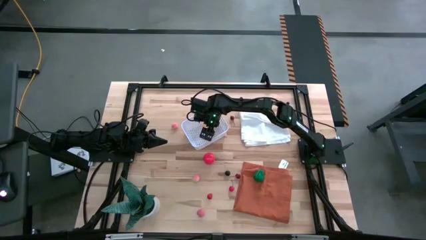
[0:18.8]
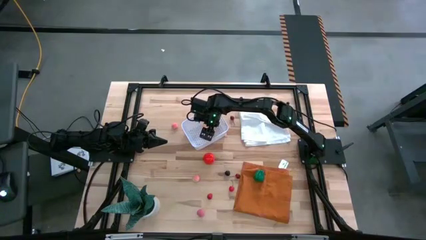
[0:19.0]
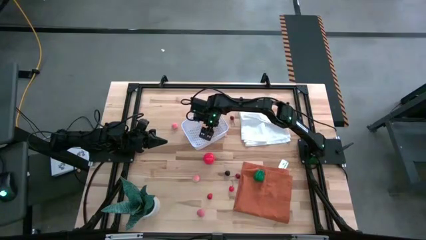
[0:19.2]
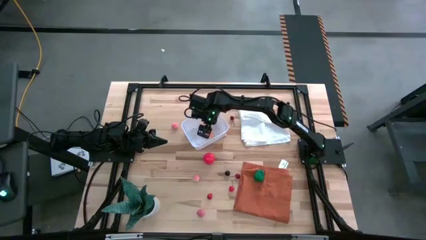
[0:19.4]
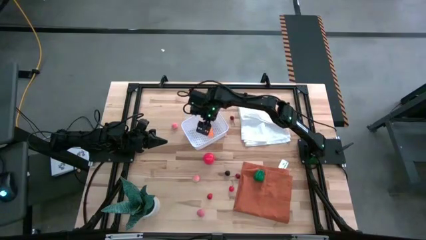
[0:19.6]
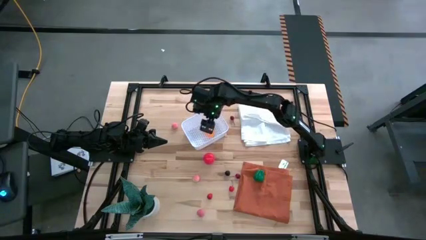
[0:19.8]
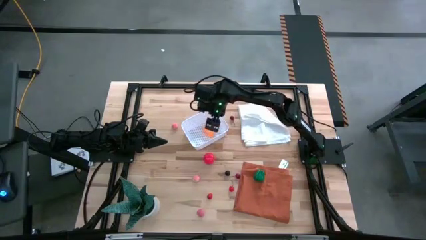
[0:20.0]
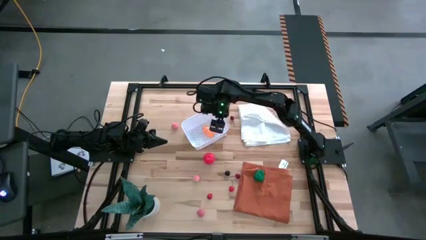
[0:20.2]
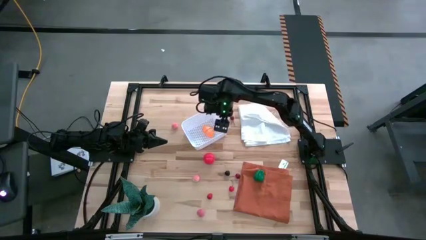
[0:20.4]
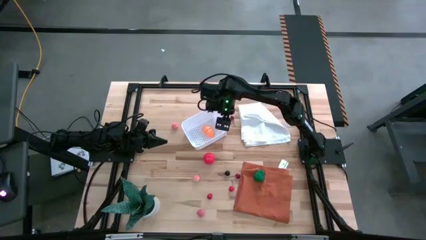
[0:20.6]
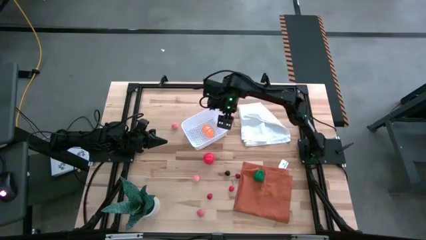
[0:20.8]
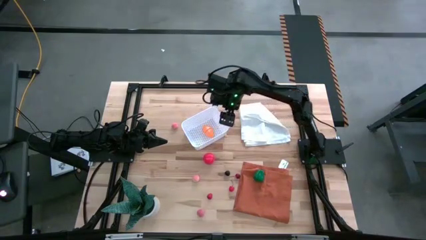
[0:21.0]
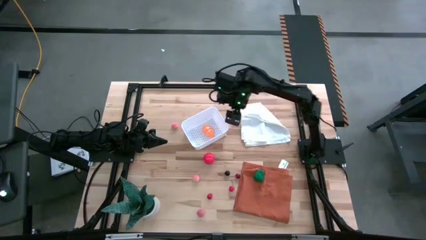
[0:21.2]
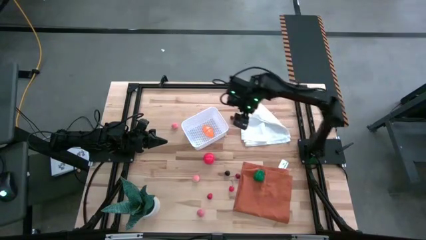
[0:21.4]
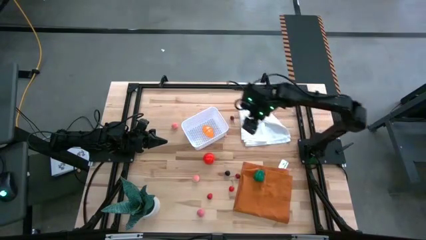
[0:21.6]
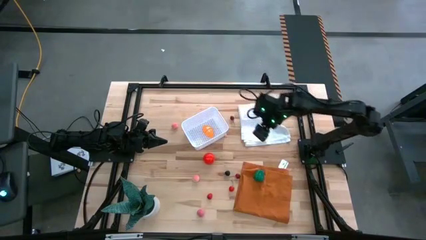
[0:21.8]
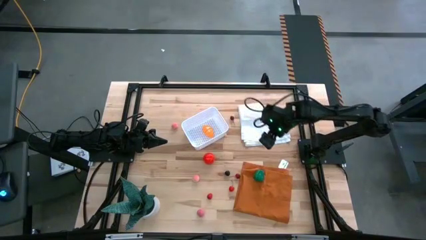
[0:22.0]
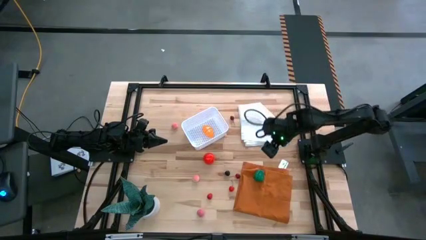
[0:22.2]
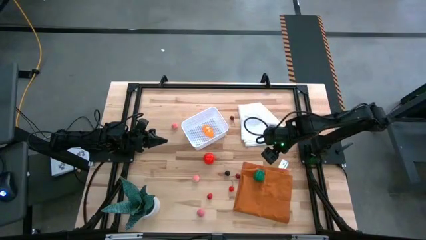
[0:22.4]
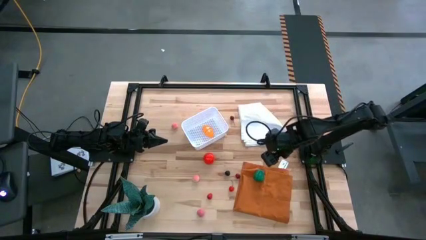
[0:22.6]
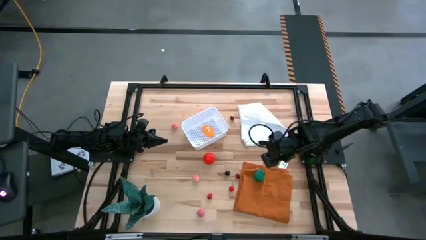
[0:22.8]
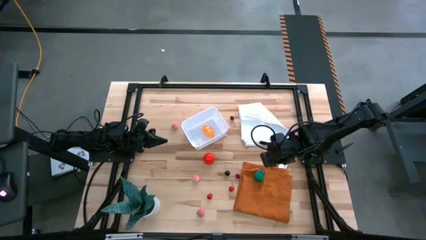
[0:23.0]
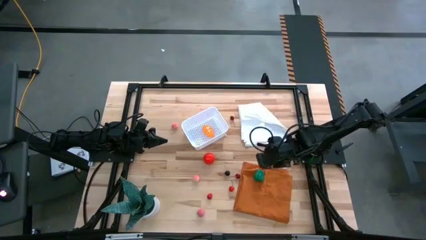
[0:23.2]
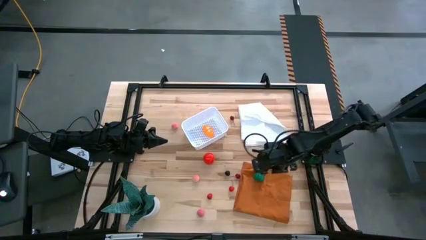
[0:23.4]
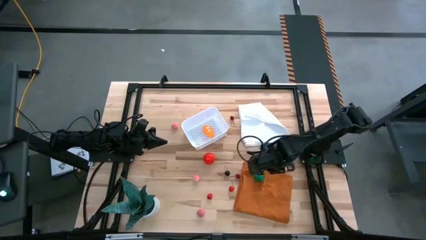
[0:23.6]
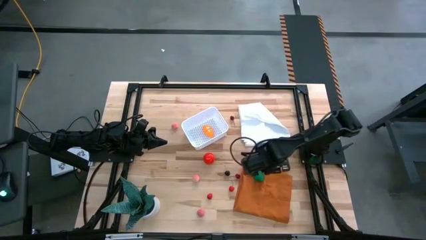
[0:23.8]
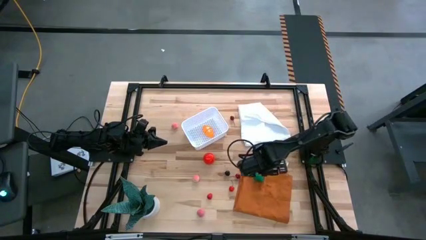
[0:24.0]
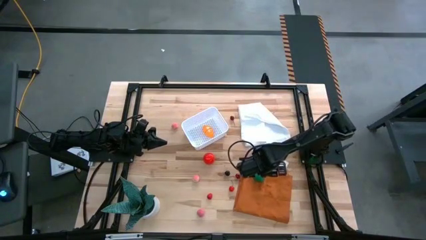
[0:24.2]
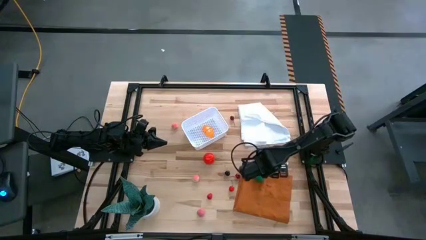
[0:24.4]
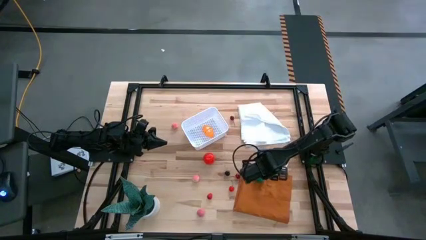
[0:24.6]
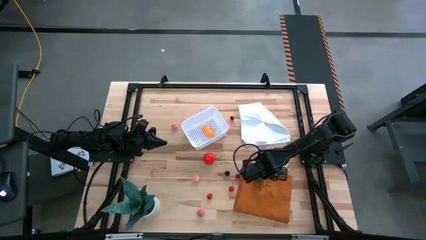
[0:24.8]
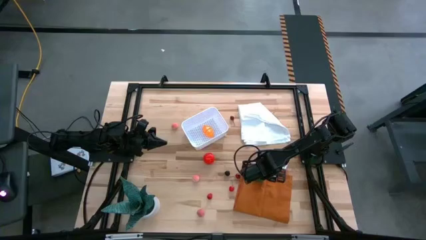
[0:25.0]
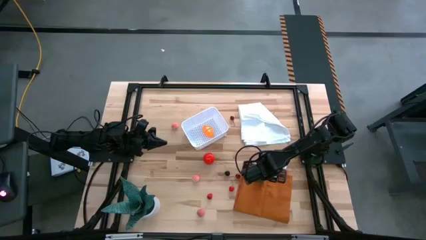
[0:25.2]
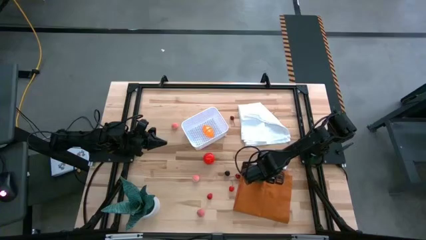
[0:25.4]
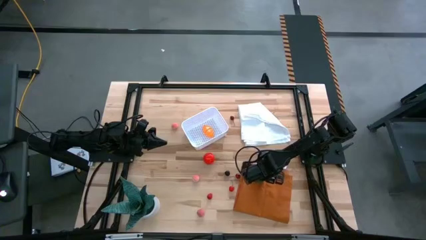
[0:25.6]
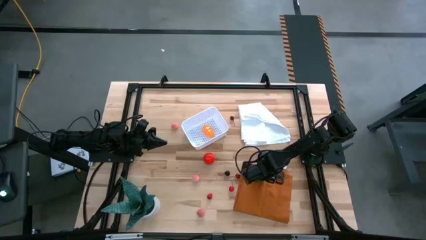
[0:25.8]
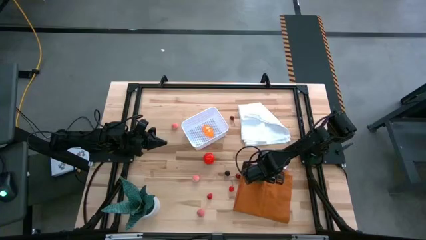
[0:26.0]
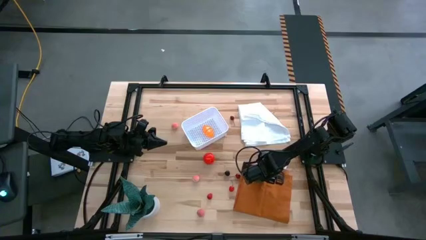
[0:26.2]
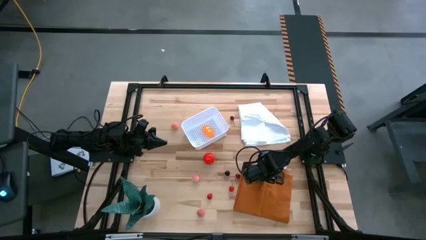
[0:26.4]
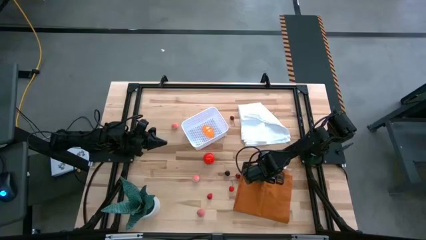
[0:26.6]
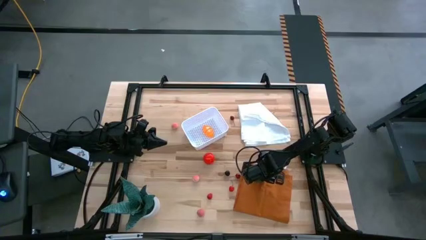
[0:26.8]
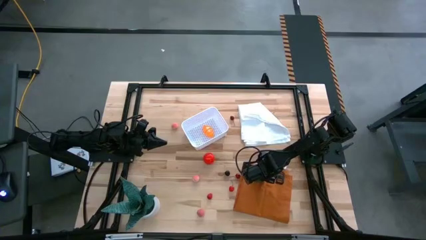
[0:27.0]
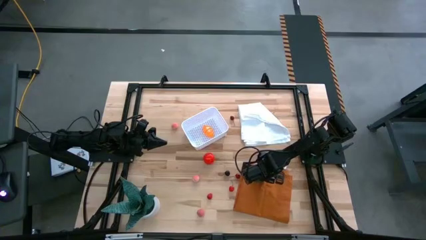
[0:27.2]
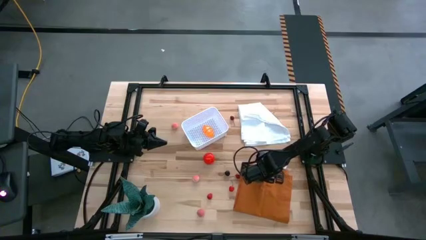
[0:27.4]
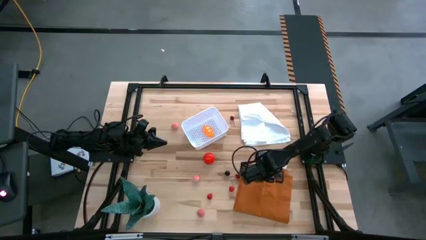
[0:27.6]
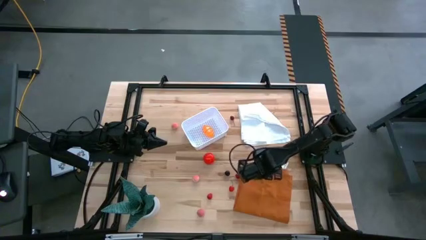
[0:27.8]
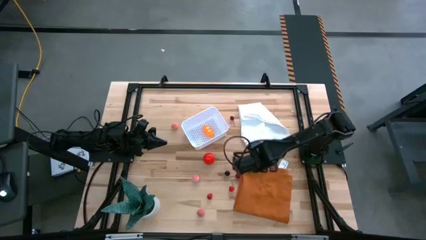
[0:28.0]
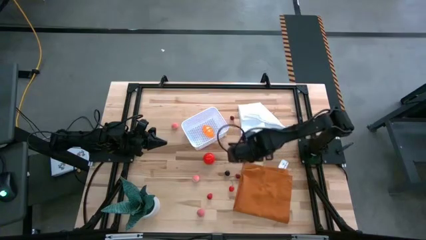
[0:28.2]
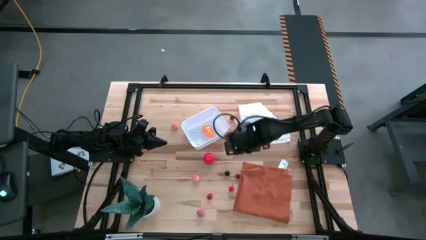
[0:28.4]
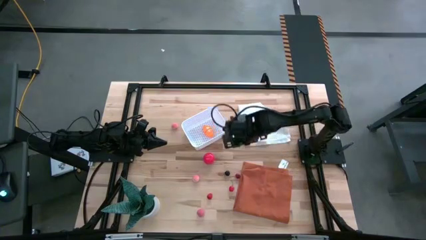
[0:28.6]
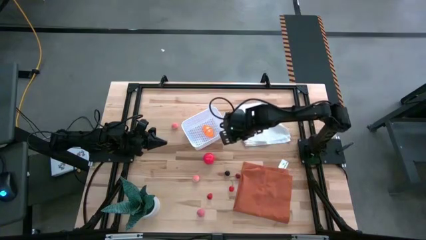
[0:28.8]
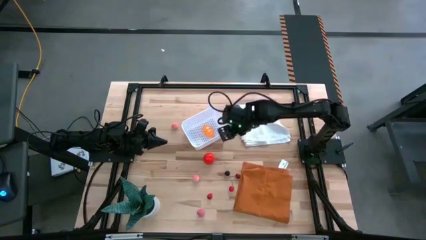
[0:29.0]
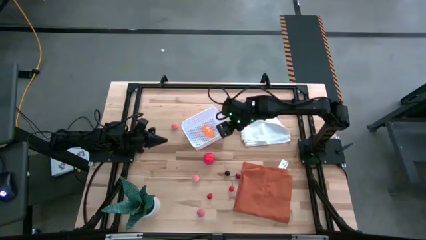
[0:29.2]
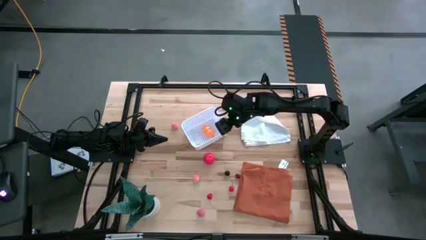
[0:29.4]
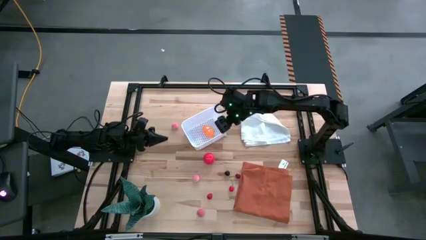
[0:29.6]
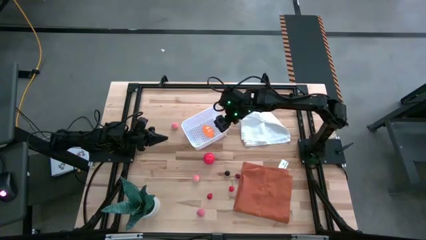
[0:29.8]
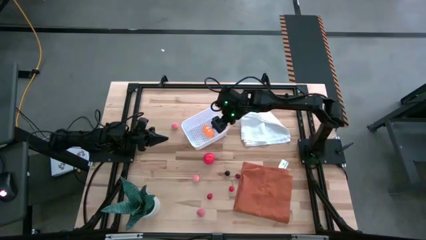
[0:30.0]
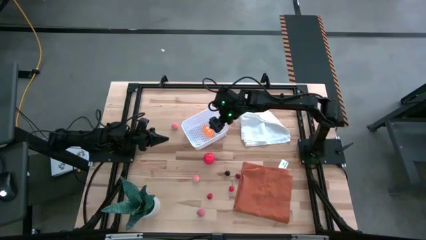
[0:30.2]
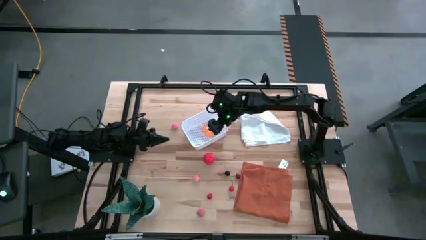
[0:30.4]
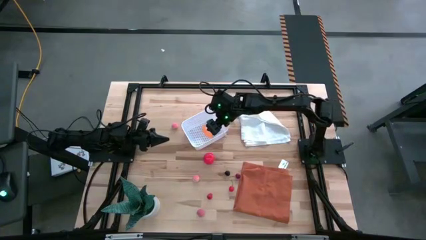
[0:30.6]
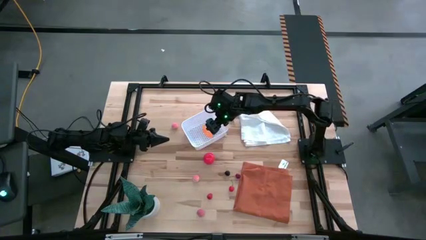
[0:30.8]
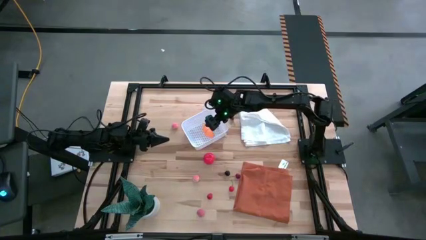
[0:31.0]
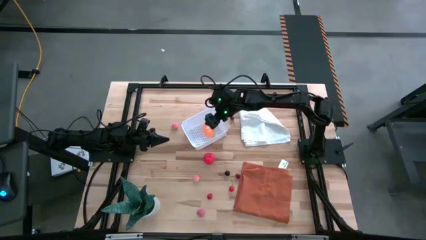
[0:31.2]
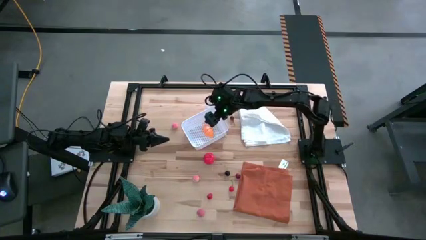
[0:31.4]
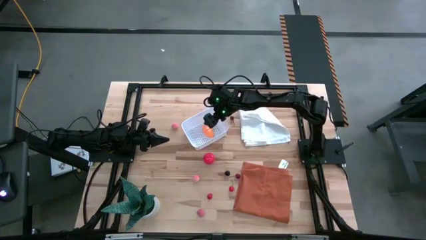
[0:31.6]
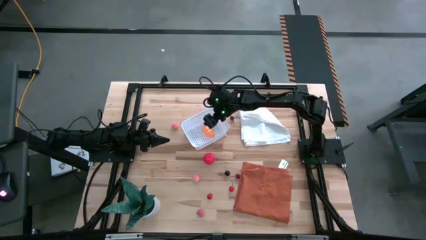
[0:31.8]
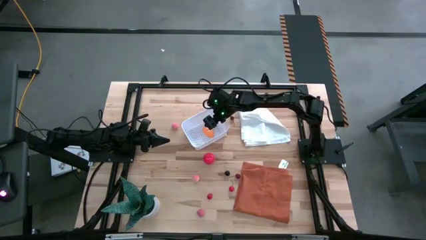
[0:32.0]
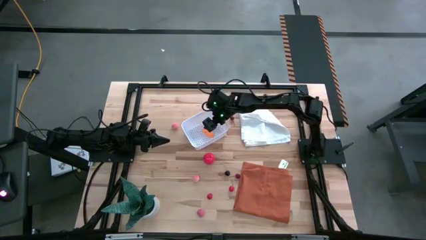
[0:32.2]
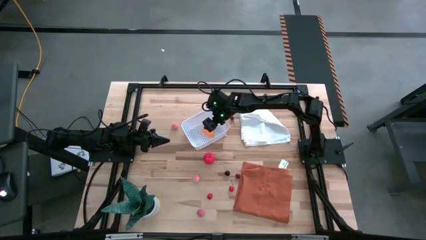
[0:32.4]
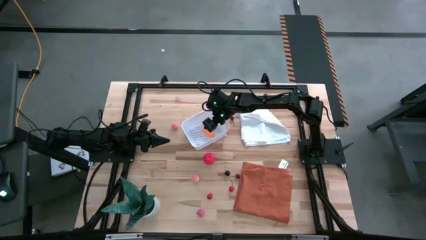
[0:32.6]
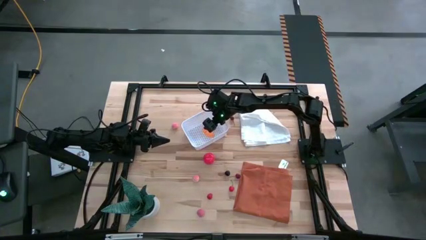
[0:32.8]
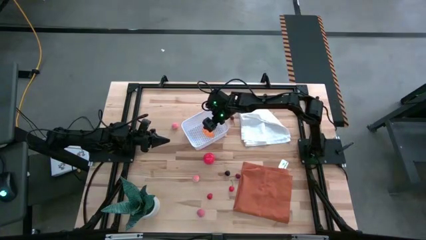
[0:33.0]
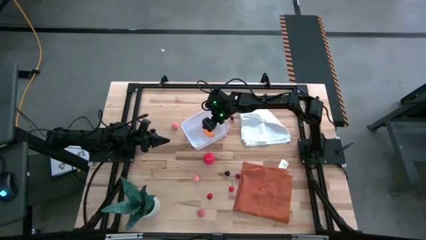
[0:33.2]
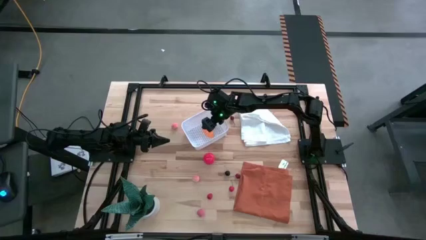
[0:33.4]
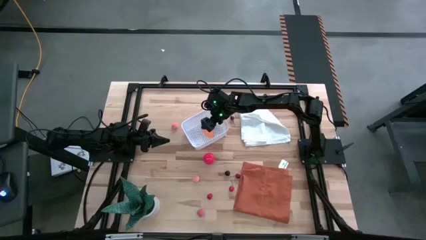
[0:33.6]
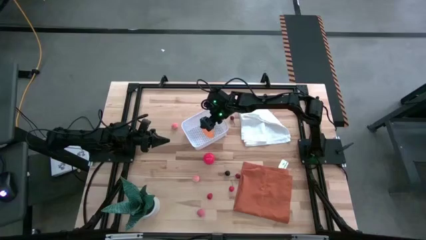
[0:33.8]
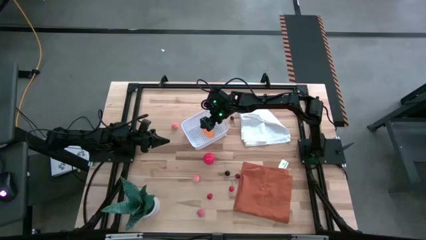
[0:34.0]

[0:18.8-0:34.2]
Task: Pick and placing Produce into tupperware
Put the bell pepper in the basket
